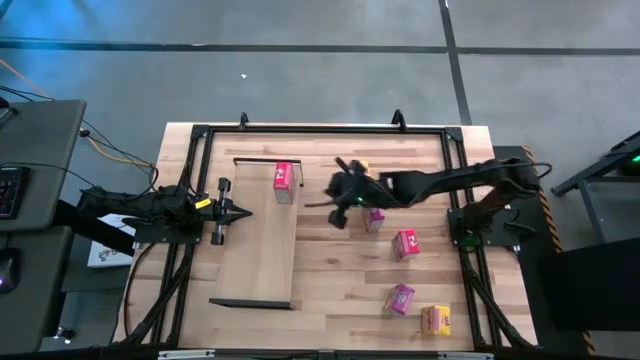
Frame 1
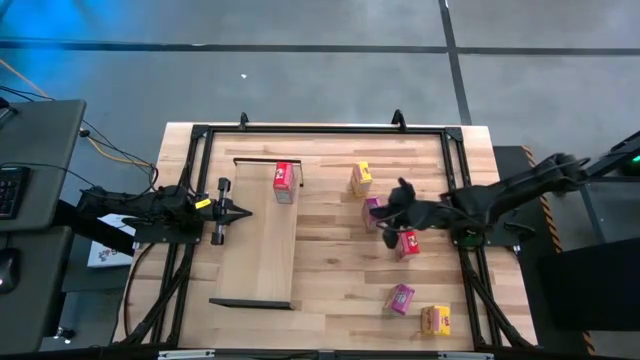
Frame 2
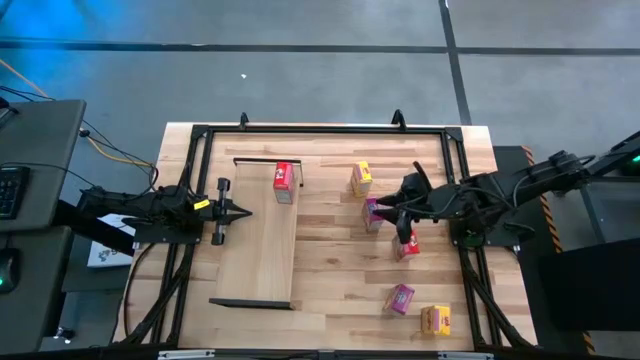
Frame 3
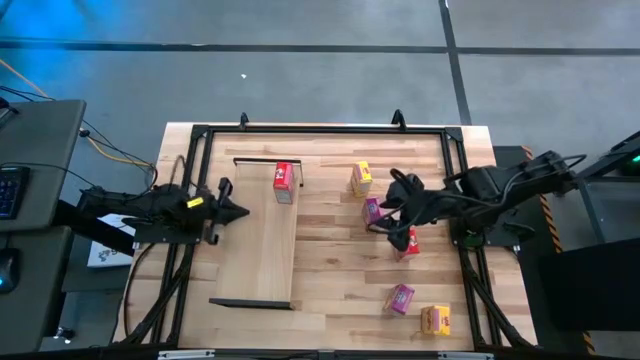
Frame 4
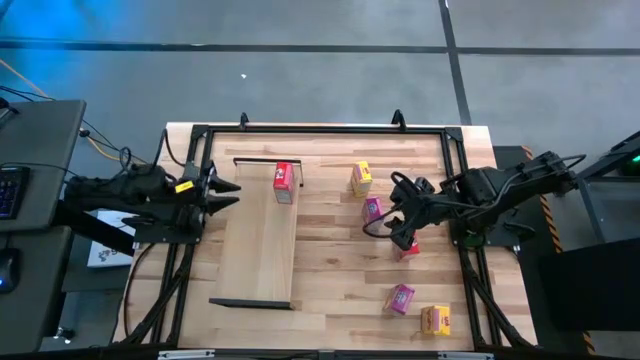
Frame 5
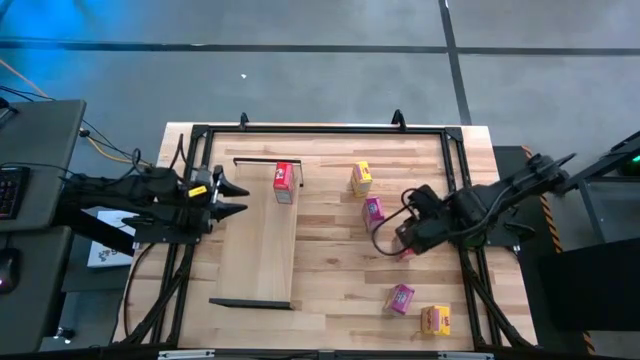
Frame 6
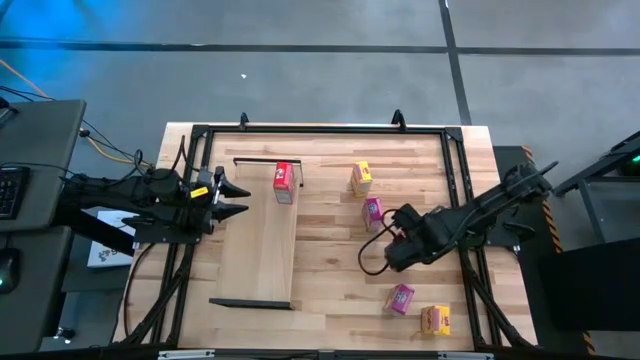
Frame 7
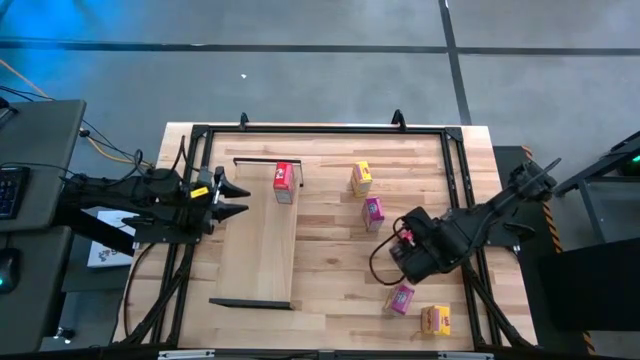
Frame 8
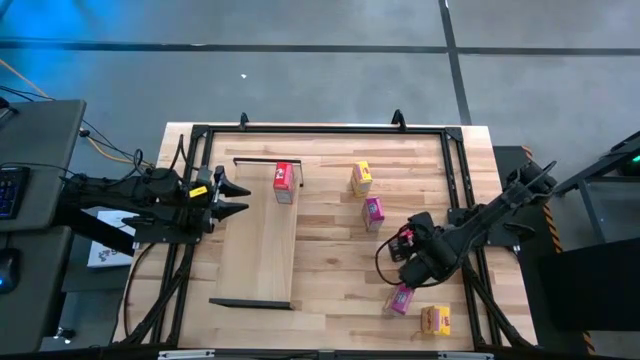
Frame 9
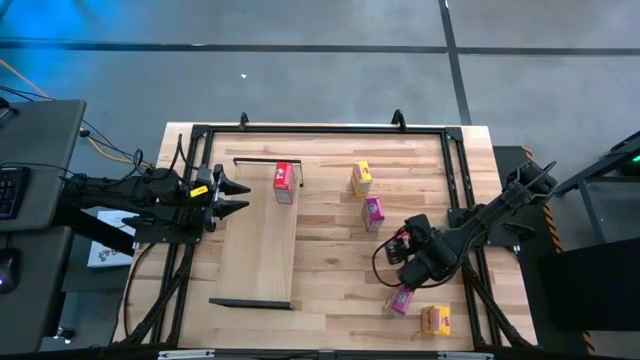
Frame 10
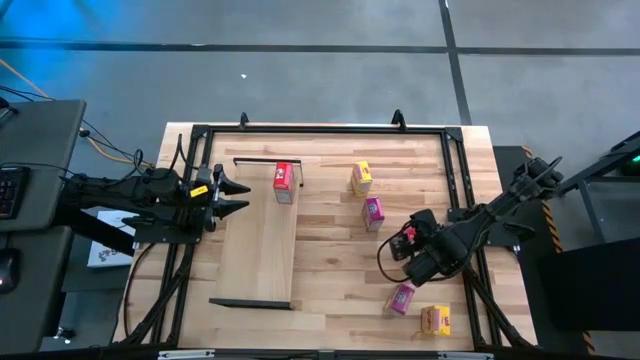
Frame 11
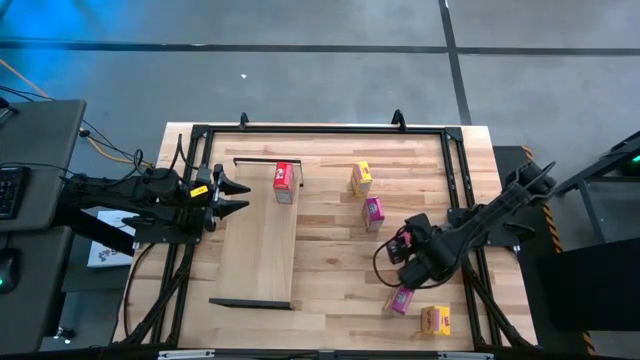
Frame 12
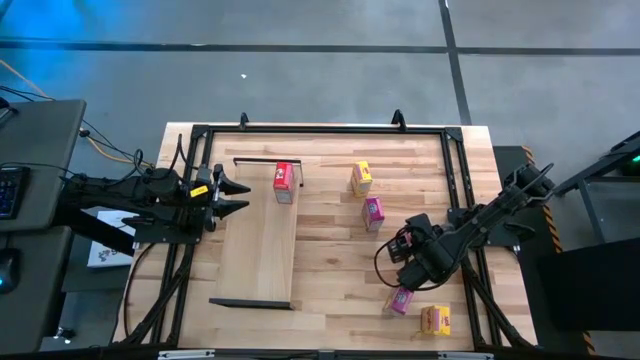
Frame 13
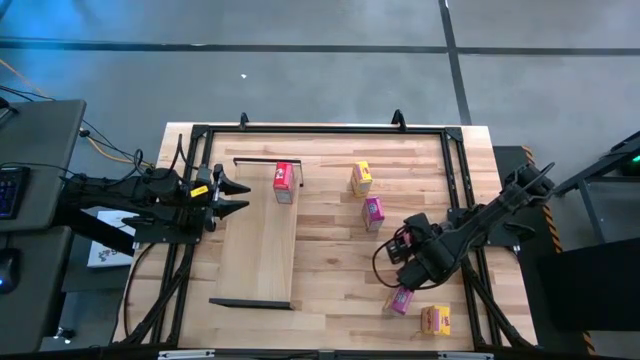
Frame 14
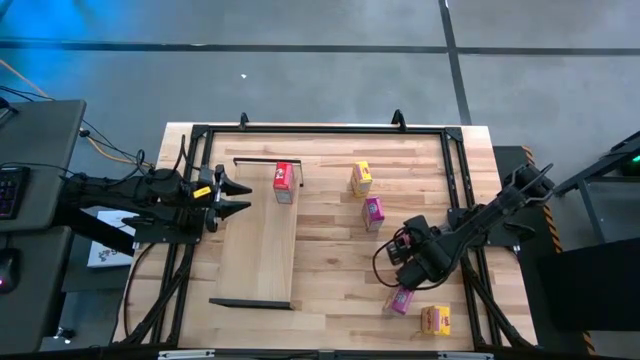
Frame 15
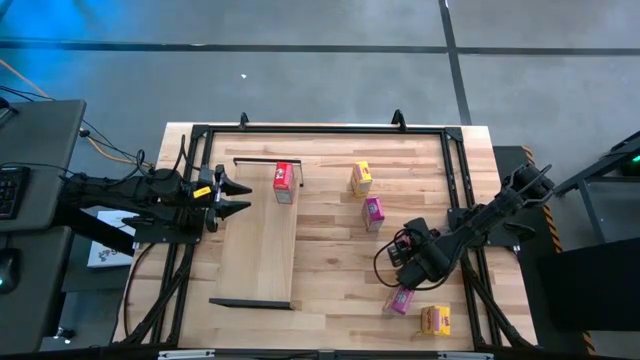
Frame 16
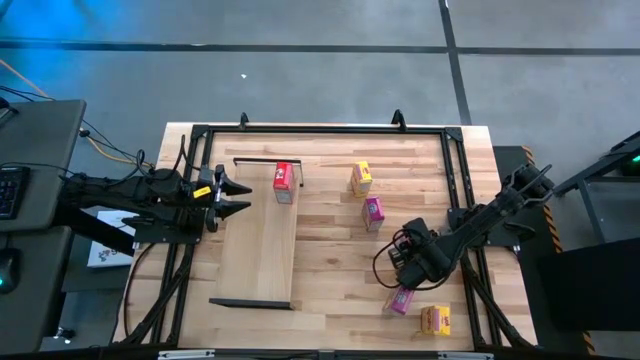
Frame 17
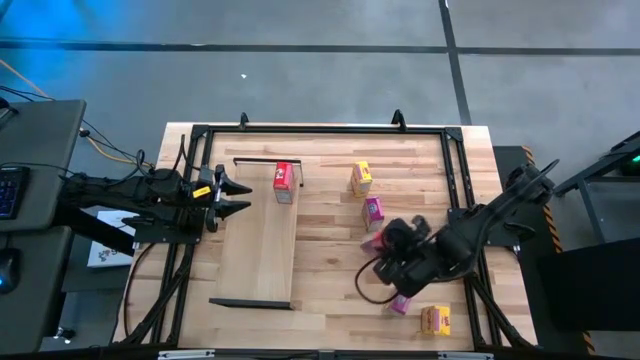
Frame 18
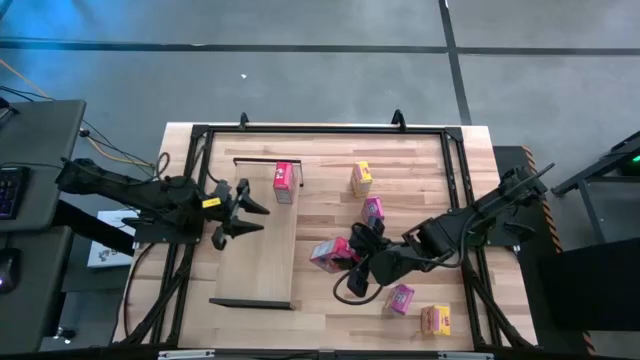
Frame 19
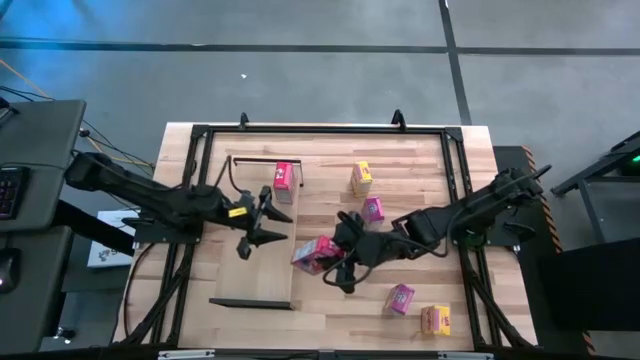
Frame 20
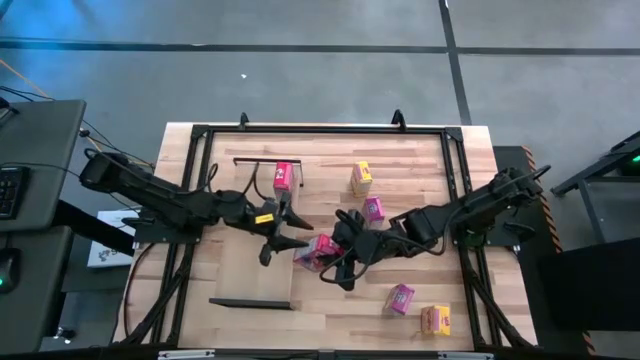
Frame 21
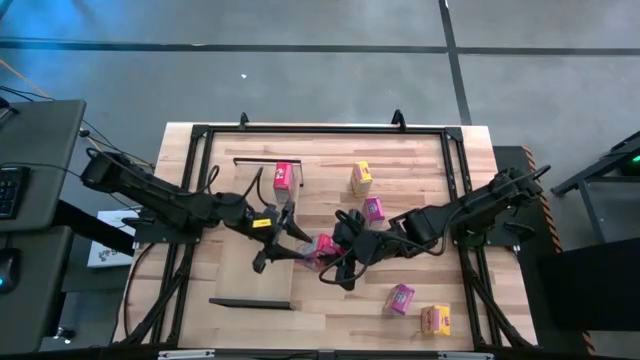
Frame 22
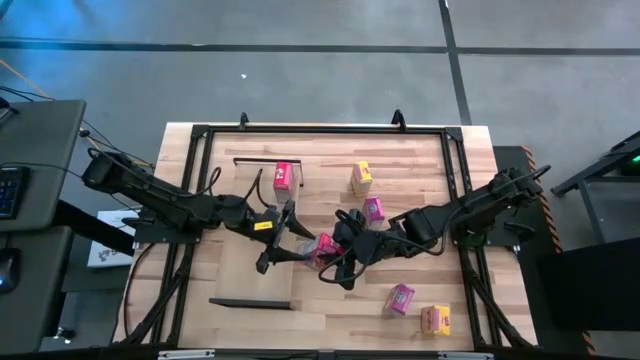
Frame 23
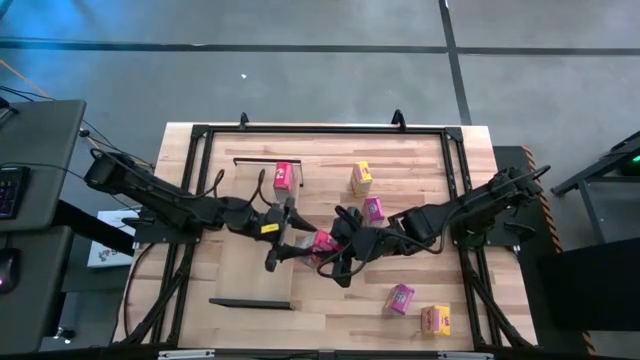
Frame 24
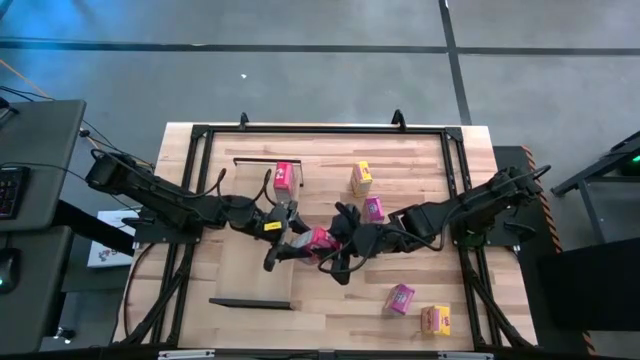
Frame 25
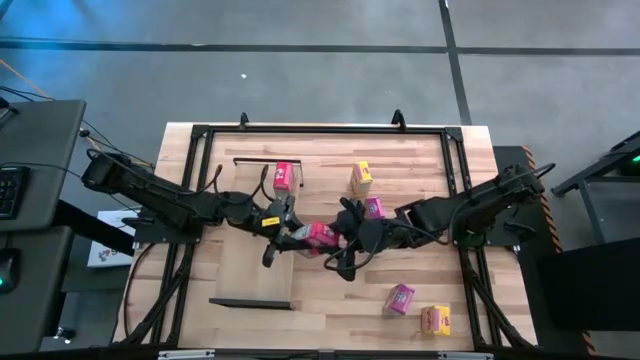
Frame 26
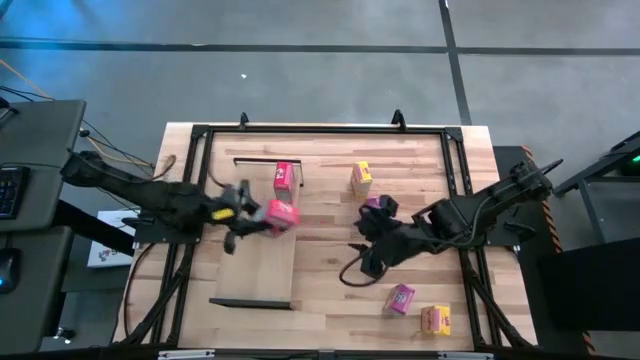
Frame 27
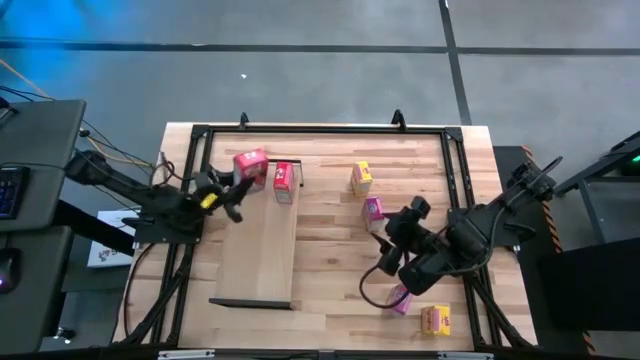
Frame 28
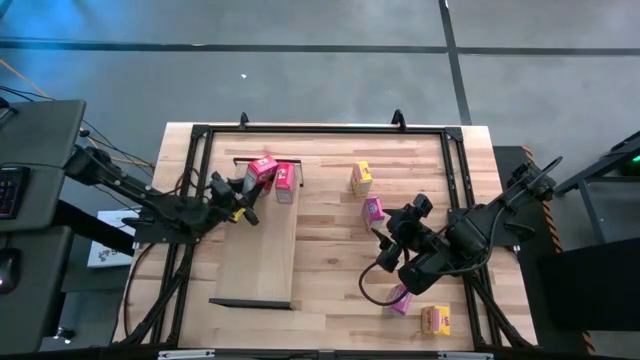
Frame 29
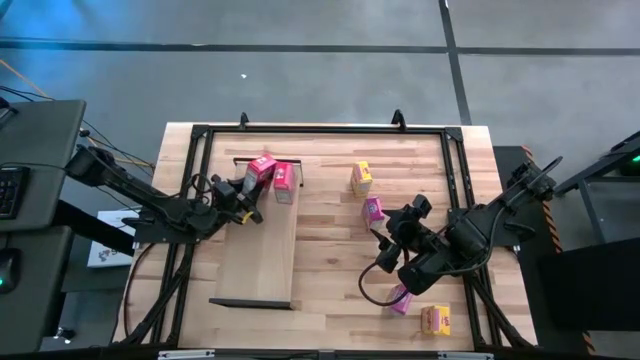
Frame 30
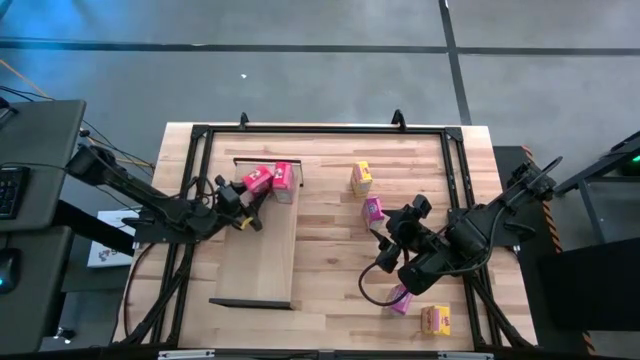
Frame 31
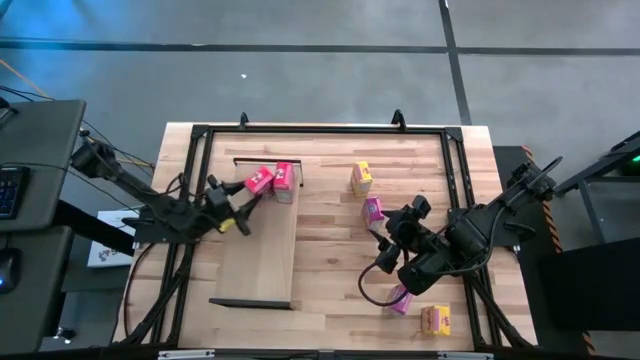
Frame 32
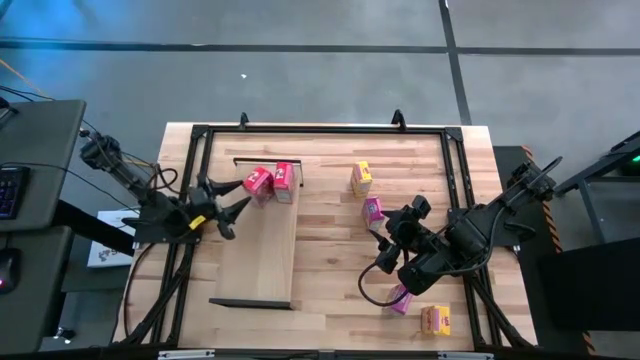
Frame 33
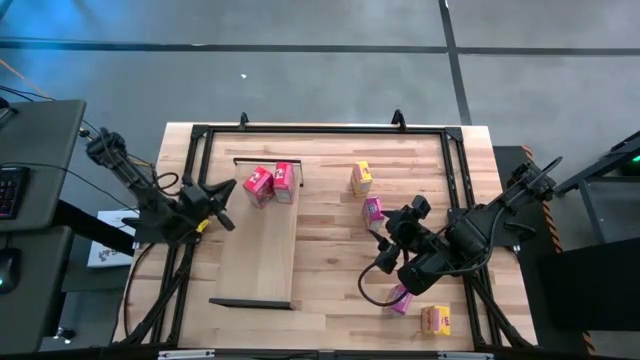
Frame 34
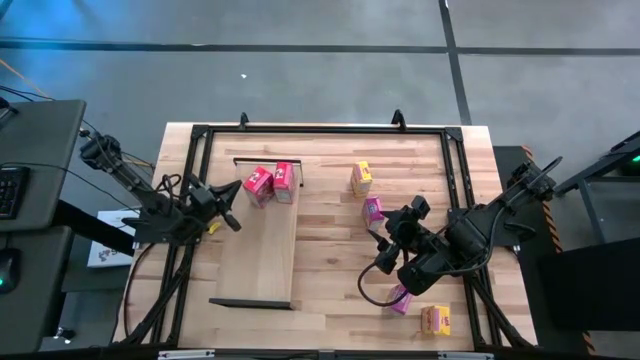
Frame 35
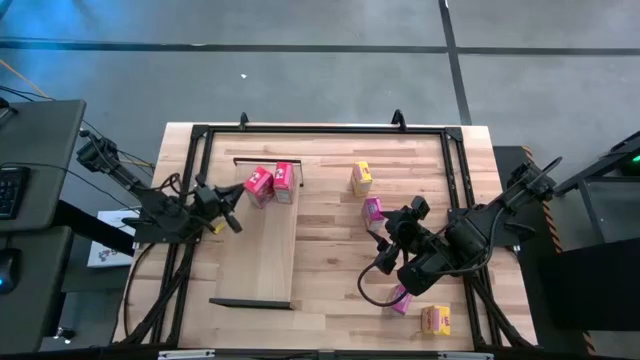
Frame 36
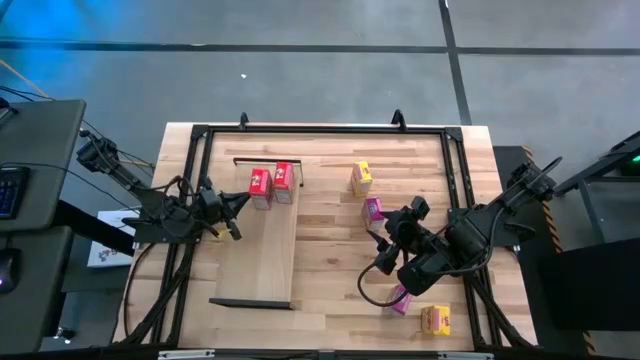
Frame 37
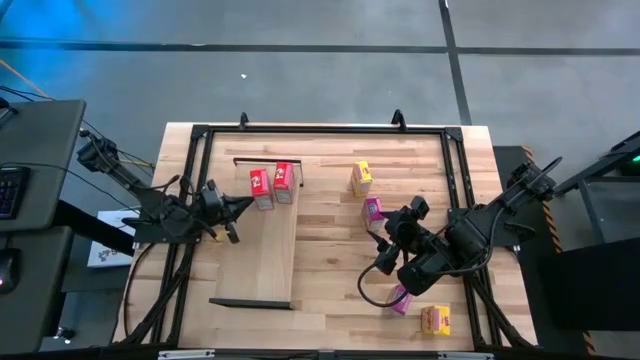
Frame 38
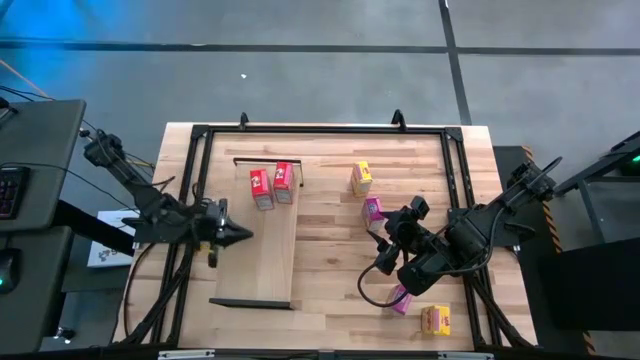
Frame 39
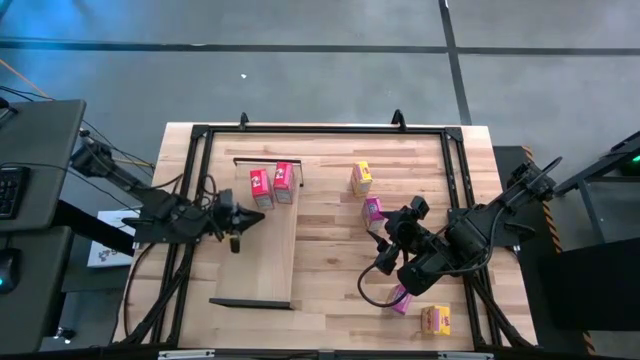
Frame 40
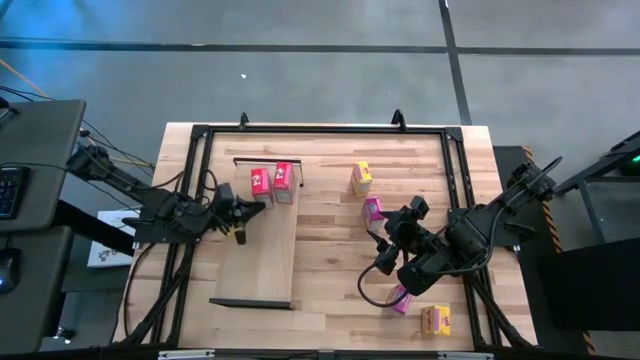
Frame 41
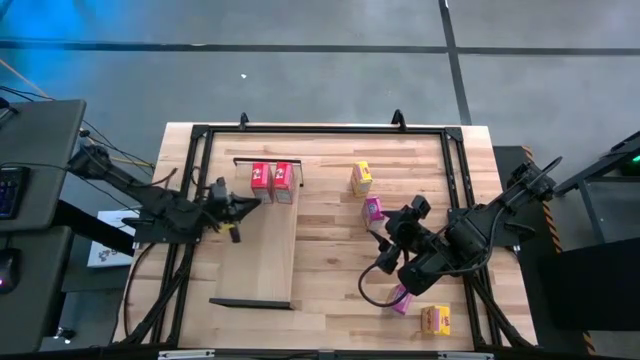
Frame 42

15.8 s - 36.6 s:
Task: Stack cereal on shelf
Put the red cereal box on the shelf aligned with the red cereal box
